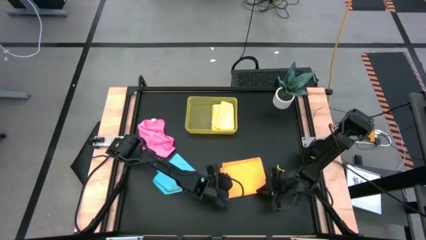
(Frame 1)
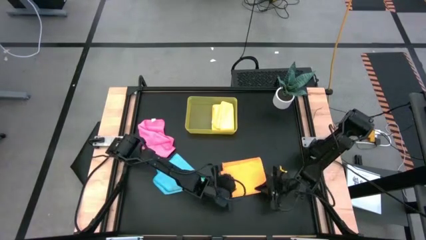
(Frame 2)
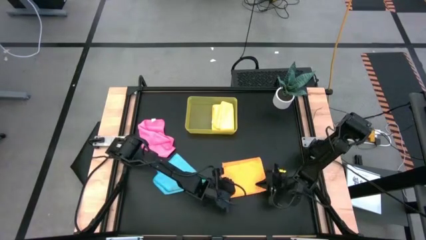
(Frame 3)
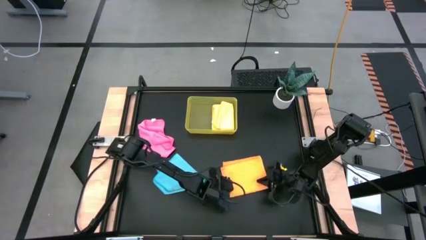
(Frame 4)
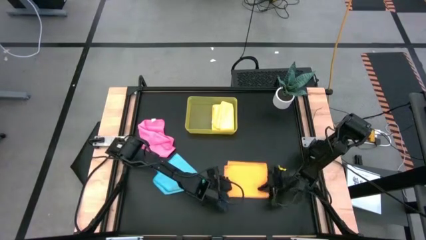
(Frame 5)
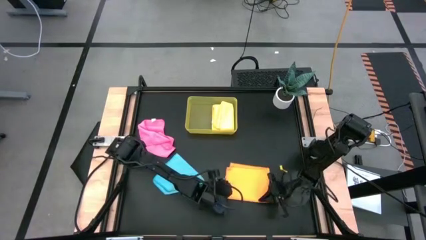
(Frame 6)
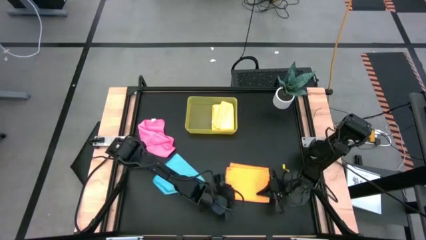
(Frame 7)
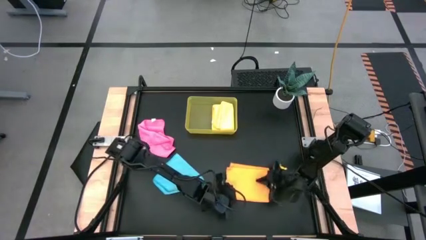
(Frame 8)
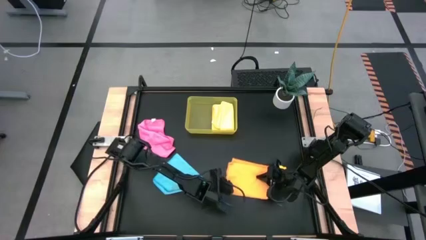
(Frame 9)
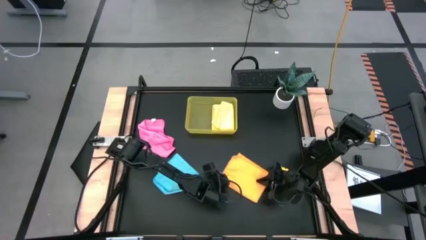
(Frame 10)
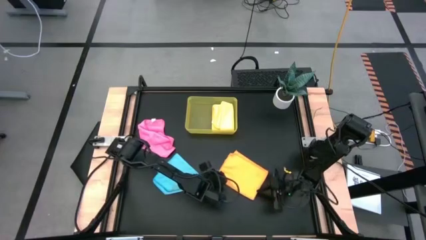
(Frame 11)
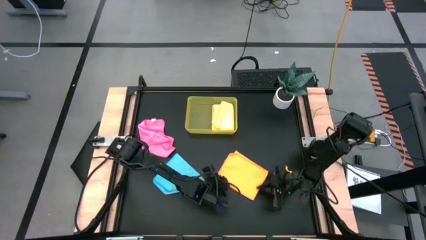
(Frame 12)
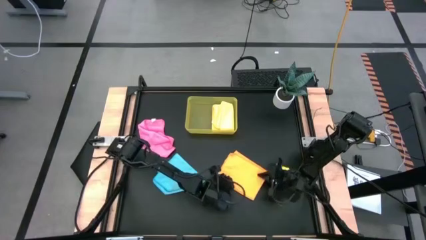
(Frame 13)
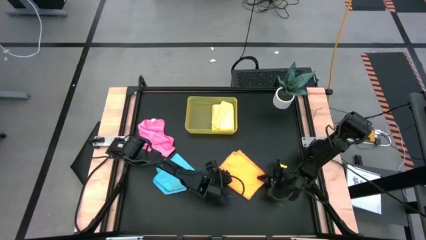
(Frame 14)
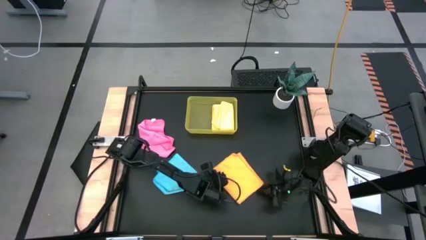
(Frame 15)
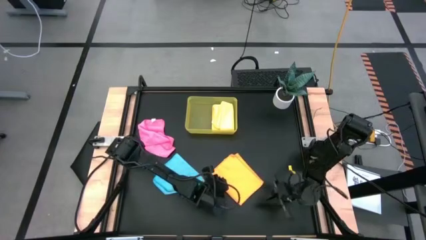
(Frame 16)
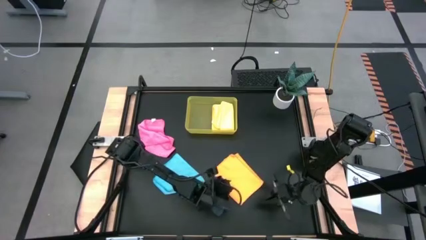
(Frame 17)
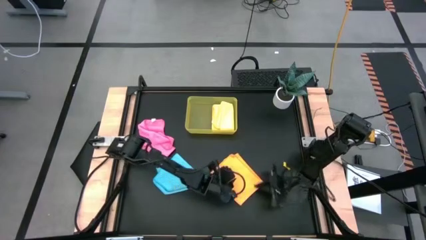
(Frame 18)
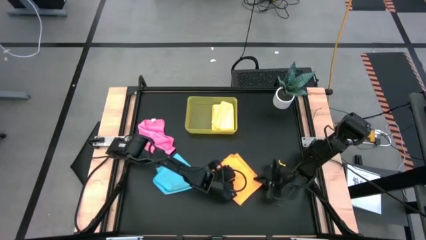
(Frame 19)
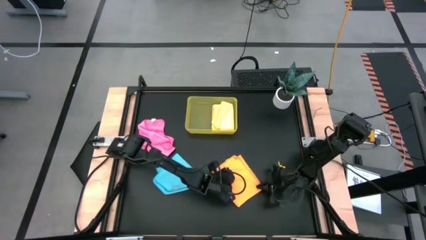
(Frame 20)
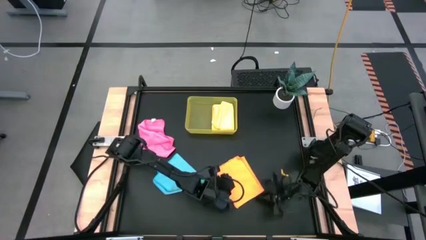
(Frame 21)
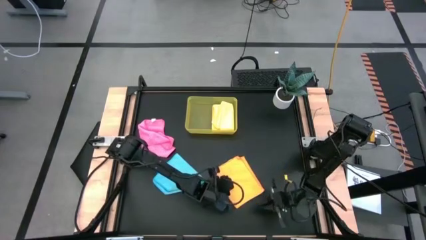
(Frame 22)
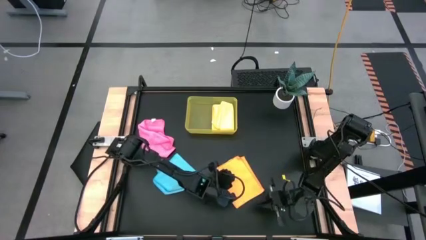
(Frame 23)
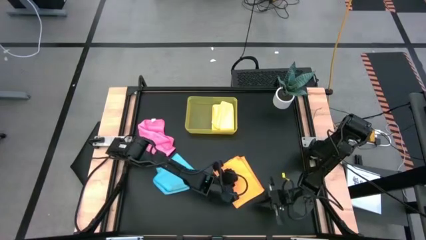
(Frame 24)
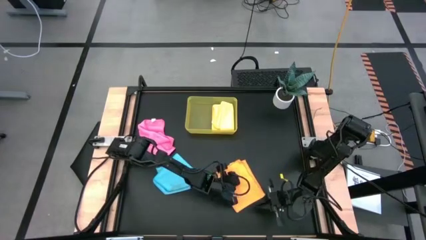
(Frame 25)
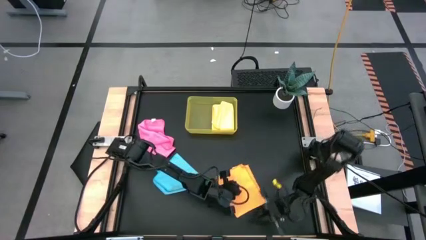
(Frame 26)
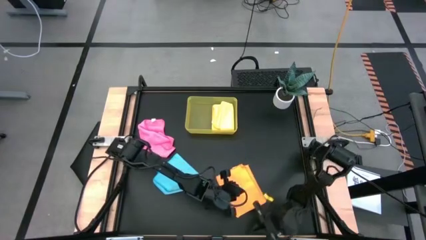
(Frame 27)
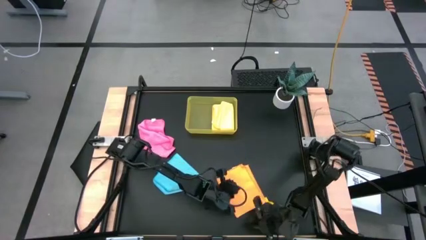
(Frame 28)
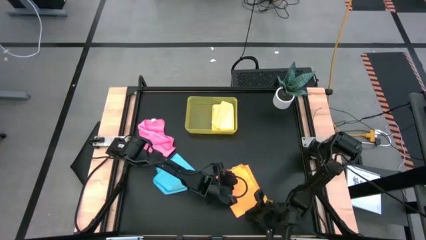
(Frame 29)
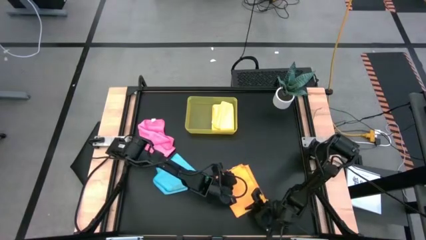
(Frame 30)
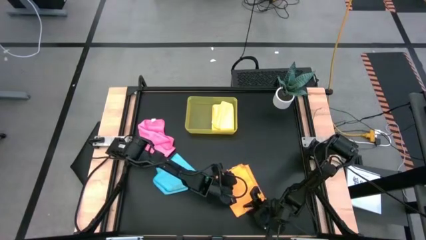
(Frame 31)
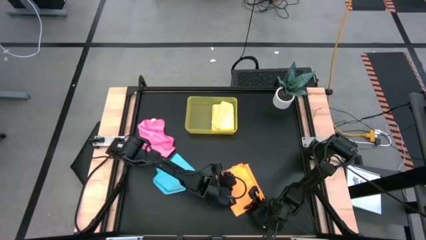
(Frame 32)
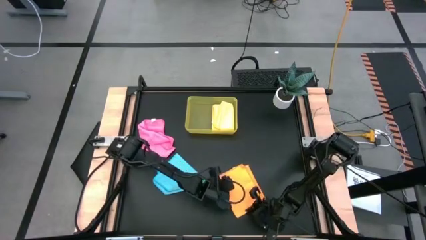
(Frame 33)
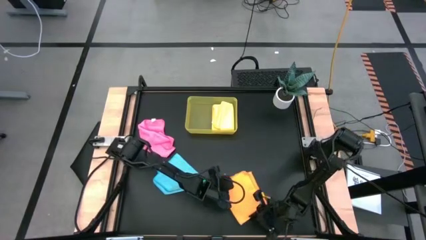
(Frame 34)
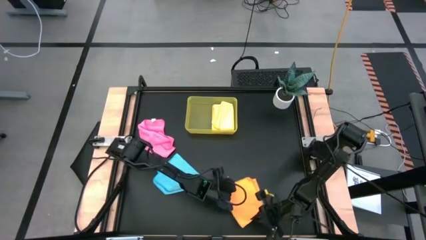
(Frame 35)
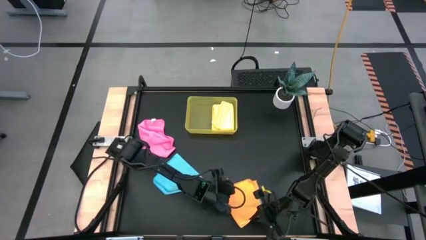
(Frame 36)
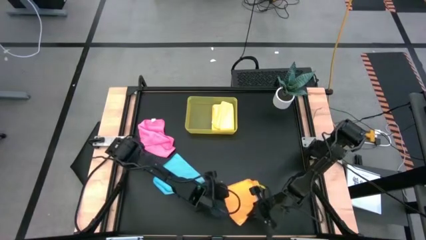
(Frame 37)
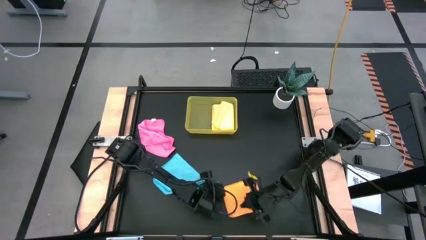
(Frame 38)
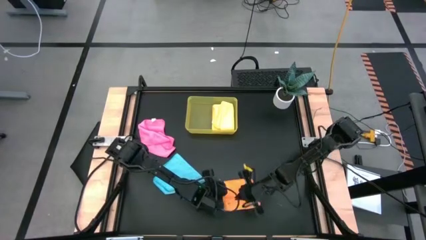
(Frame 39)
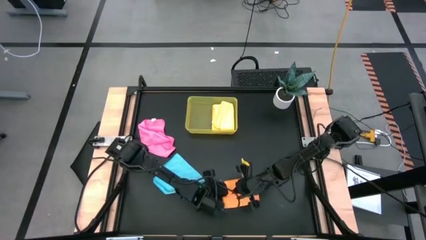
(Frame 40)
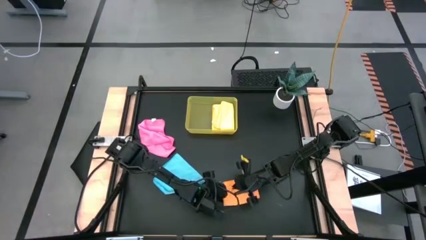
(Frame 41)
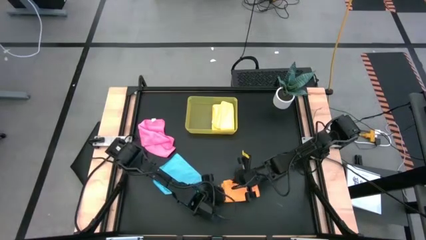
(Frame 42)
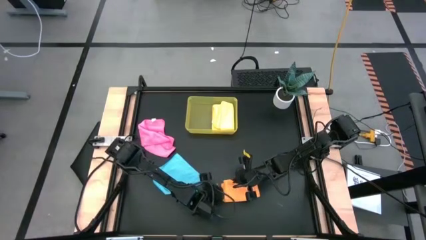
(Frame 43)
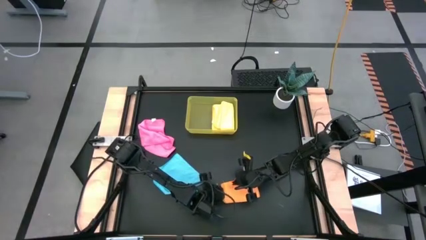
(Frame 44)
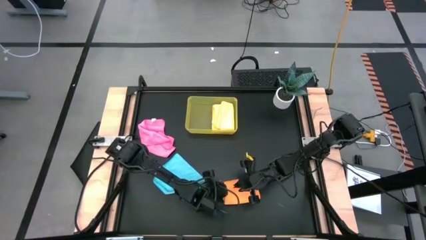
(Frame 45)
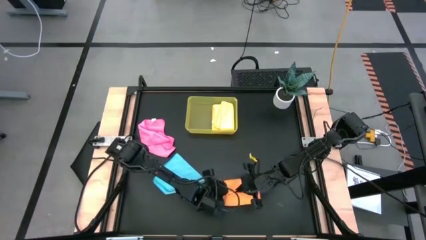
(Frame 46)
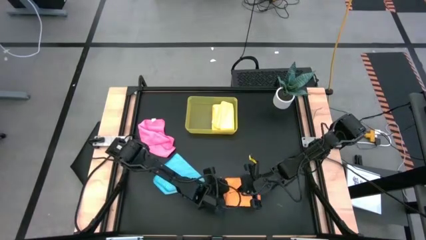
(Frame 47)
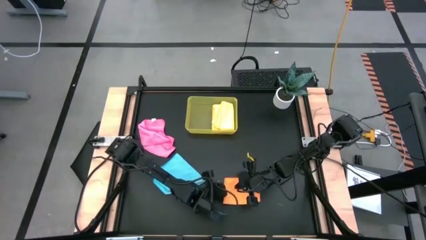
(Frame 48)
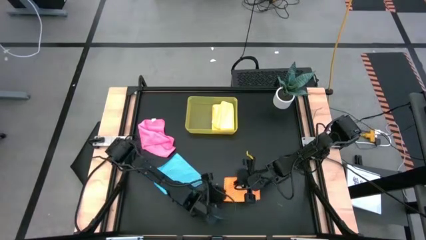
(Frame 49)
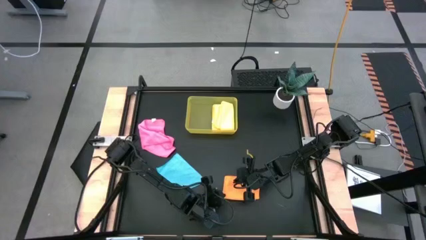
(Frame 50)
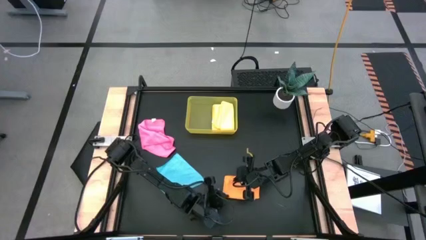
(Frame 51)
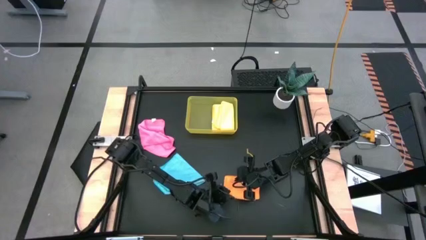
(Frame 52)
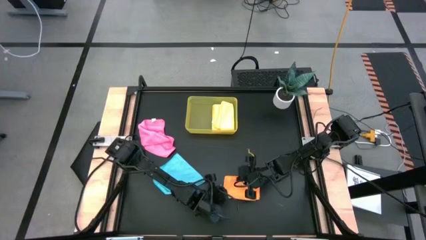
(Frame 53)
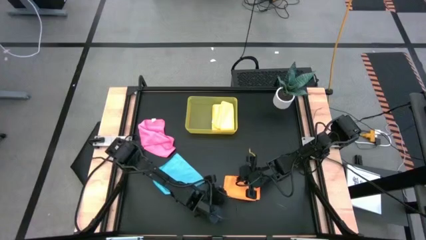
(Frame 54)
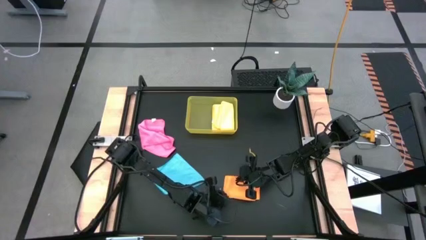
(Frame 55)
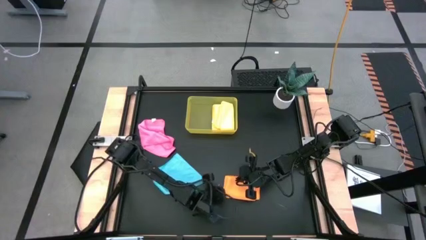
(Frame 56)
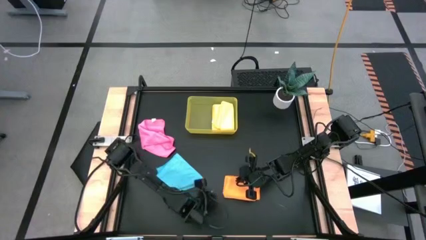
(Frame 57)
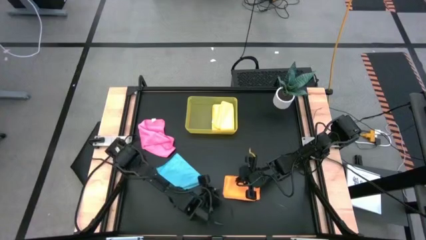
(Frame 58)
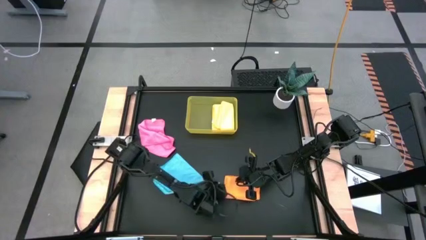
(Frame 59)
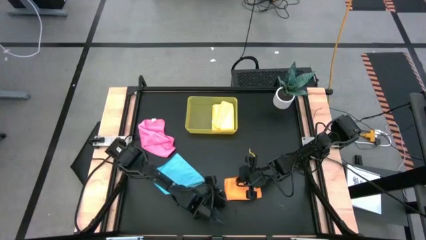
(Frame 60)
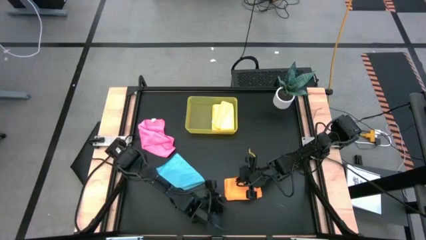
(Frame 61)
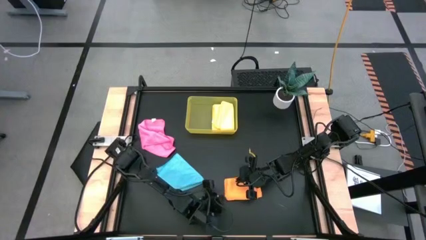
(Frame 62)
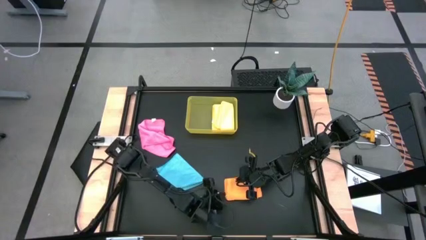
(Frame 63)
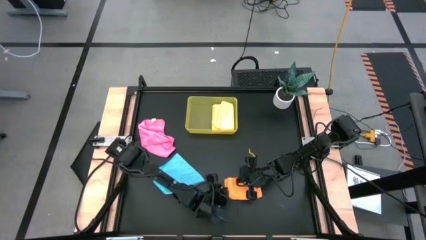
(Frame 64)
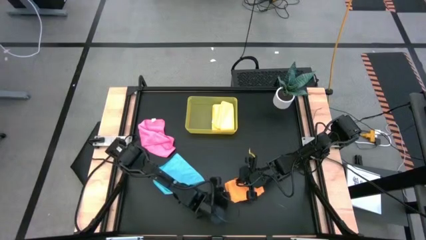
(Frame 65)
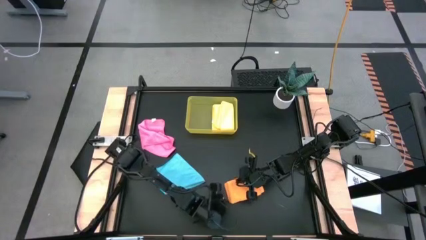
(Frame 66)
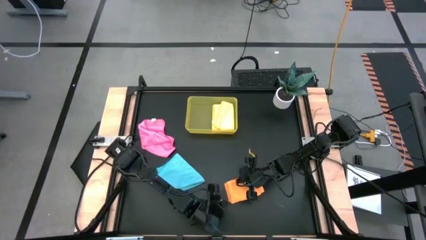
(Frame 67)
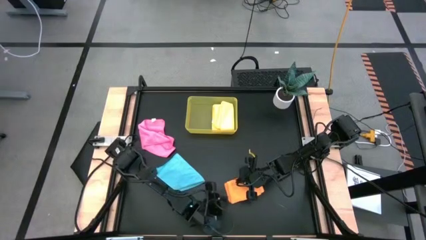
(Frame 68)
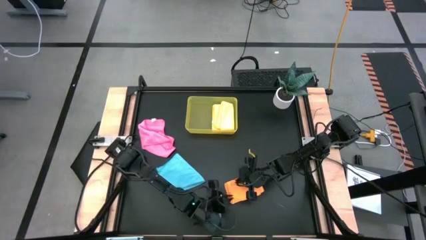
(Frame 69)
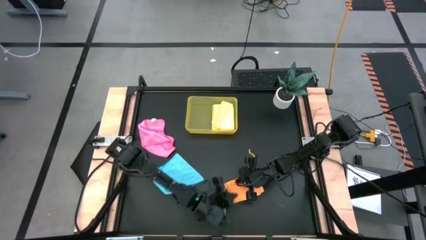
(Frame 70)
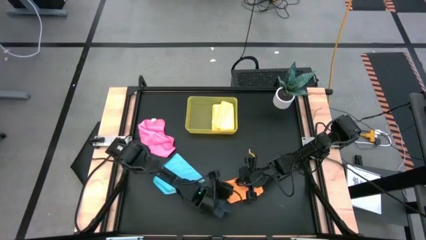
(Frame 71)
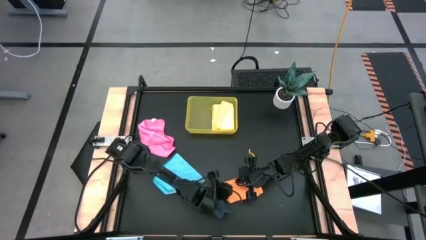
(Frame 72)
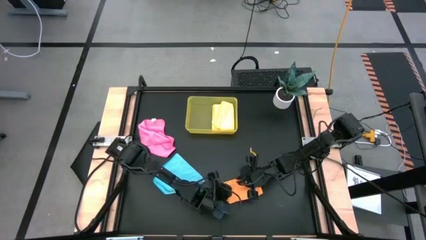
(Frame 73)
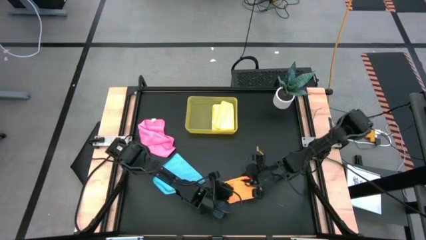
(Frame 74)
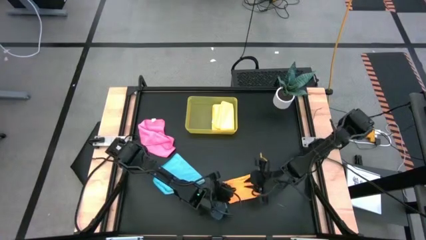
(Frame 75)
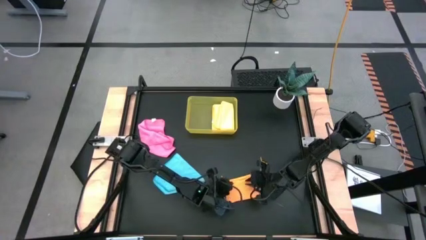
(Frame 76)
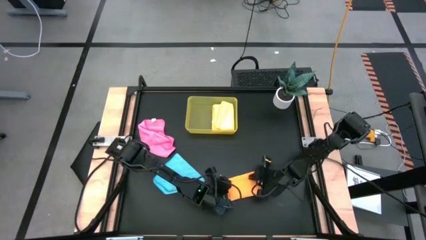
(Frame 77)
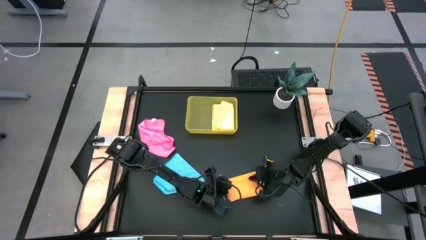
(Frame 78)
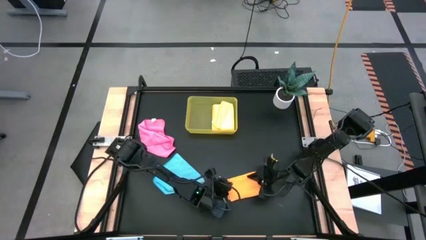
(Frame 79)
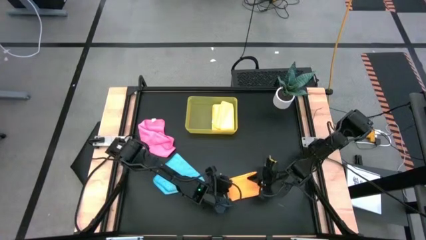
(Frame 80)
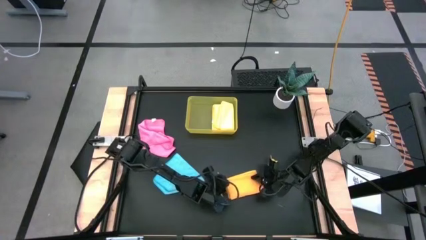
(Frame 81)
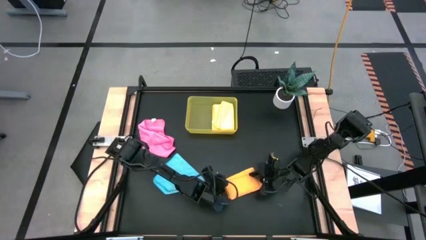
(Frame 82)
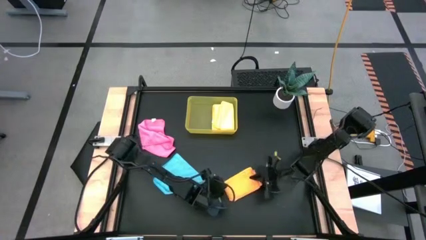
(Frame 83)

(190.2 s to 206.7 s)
Task: Fold microfiber towels
Fold the orange microfiber cloth
